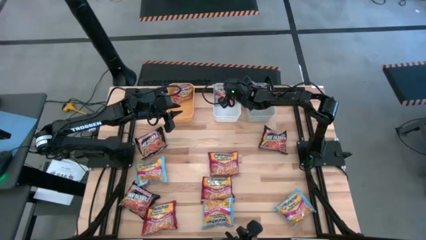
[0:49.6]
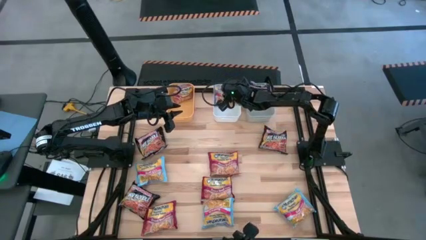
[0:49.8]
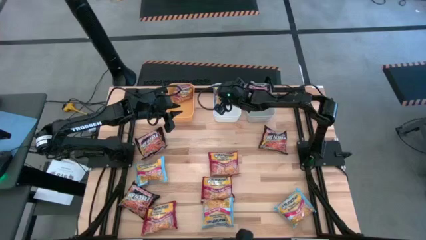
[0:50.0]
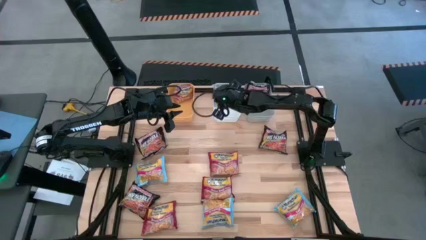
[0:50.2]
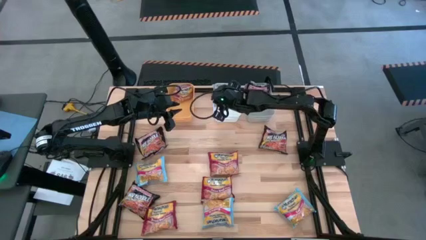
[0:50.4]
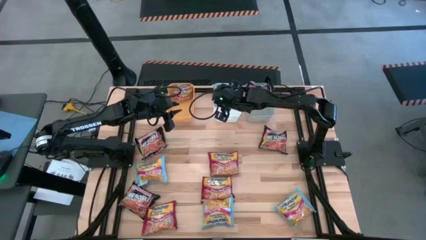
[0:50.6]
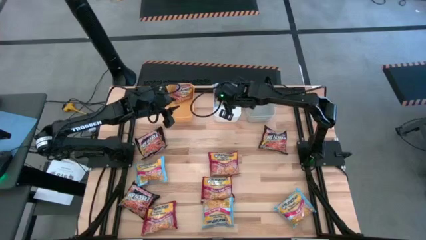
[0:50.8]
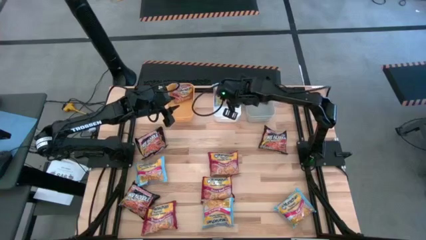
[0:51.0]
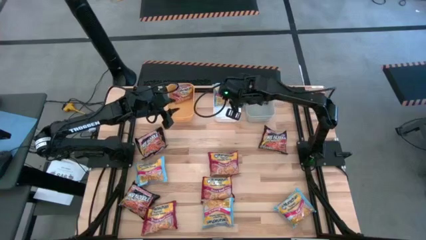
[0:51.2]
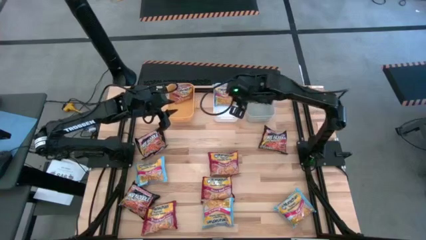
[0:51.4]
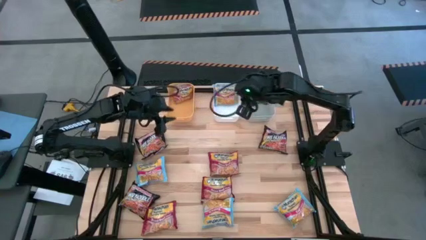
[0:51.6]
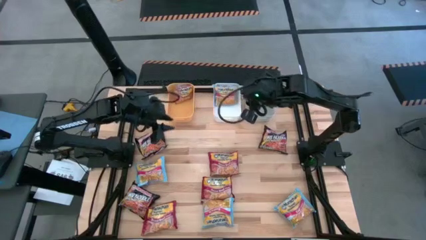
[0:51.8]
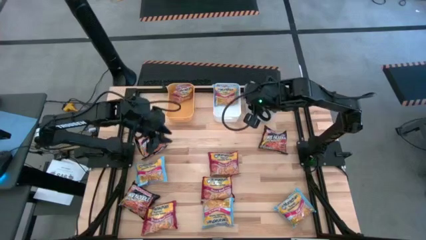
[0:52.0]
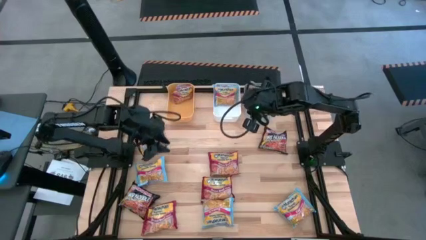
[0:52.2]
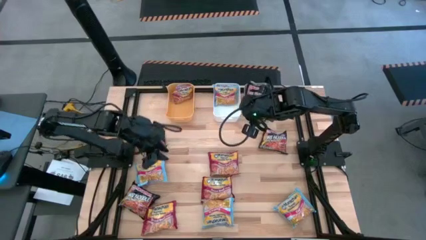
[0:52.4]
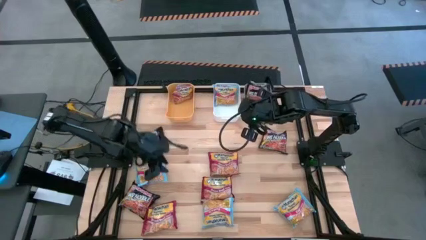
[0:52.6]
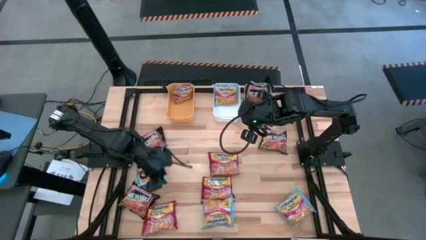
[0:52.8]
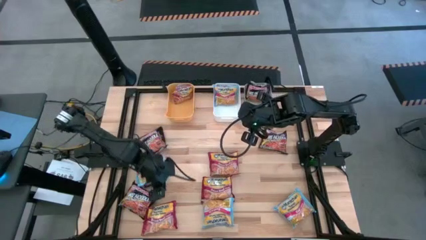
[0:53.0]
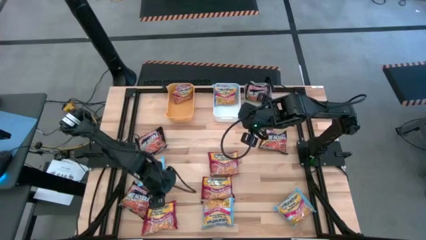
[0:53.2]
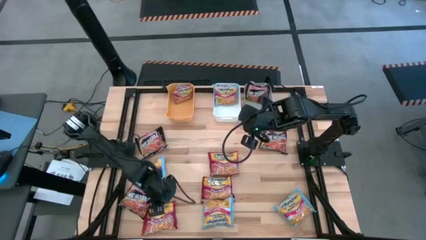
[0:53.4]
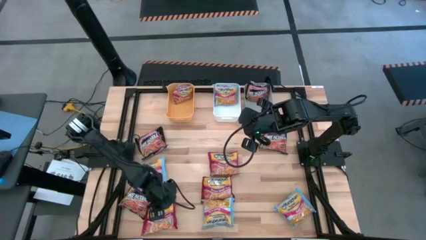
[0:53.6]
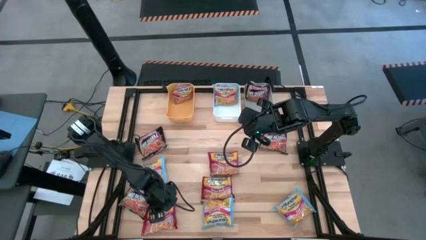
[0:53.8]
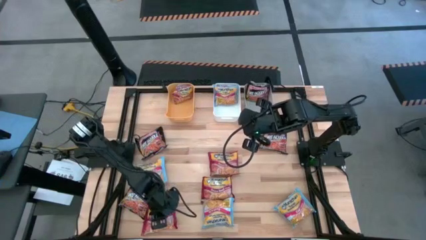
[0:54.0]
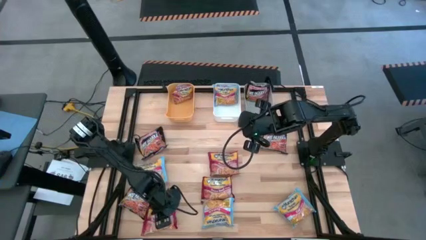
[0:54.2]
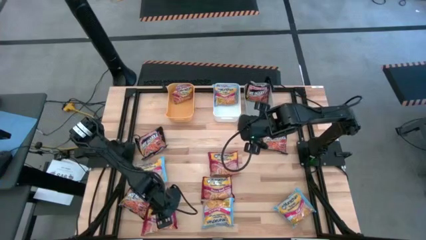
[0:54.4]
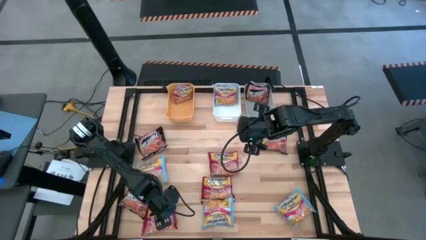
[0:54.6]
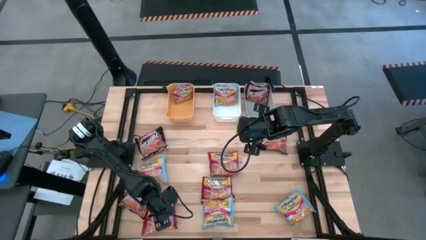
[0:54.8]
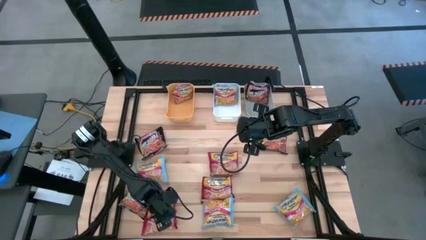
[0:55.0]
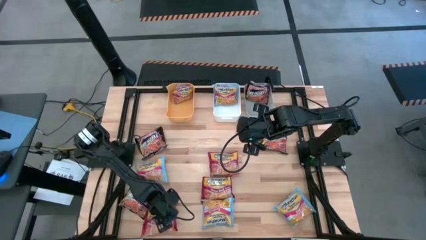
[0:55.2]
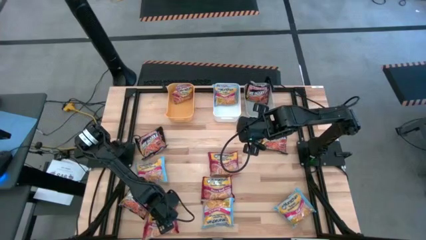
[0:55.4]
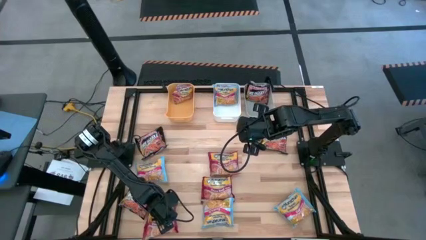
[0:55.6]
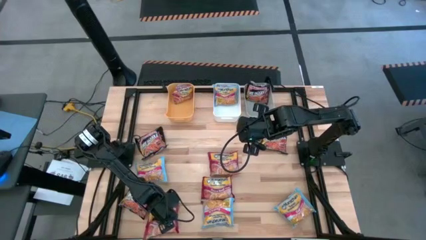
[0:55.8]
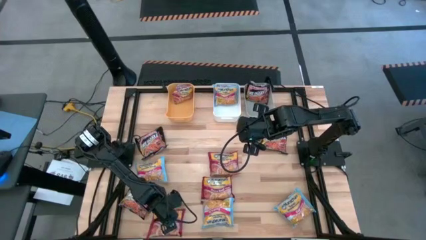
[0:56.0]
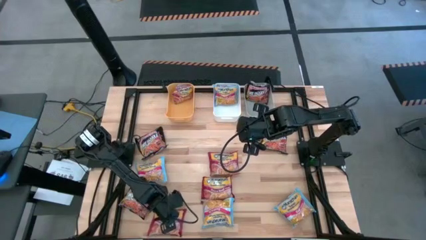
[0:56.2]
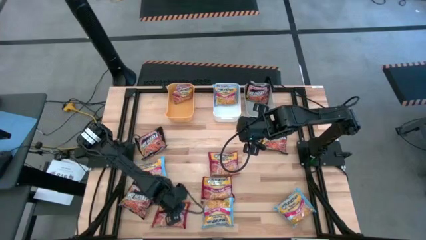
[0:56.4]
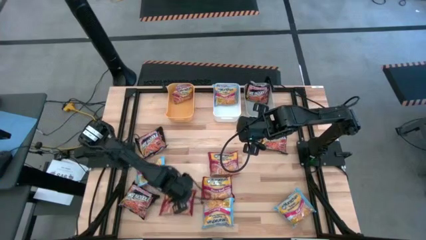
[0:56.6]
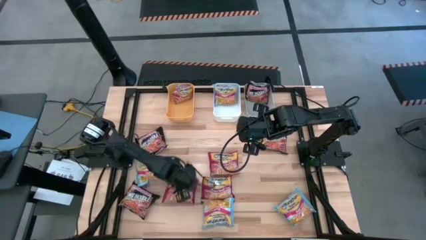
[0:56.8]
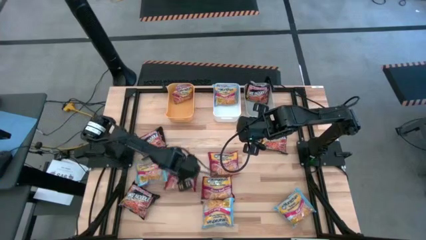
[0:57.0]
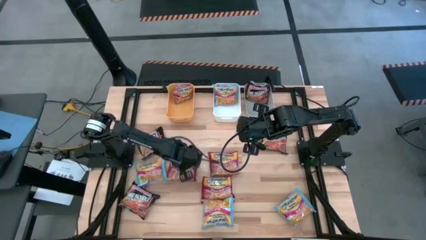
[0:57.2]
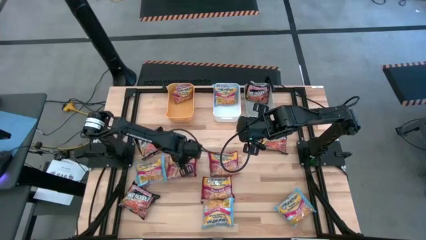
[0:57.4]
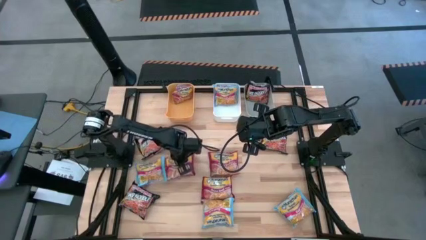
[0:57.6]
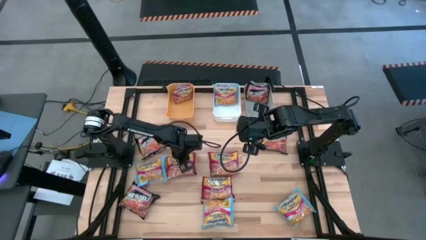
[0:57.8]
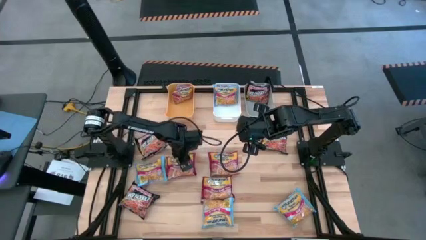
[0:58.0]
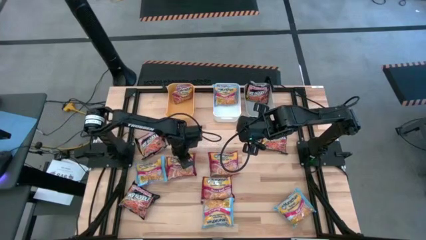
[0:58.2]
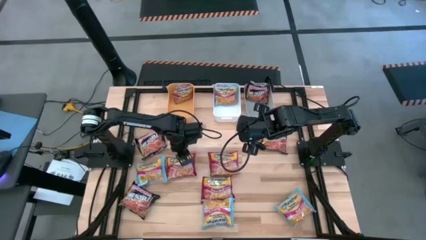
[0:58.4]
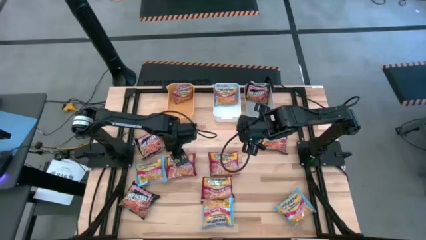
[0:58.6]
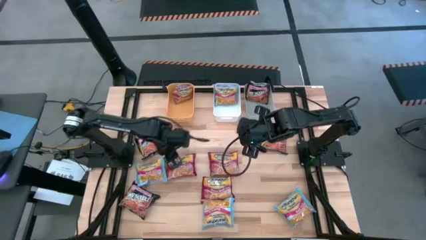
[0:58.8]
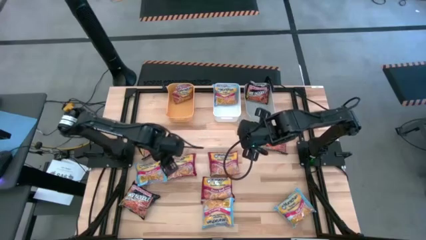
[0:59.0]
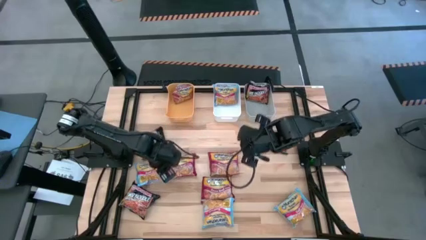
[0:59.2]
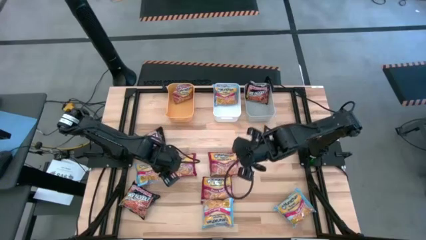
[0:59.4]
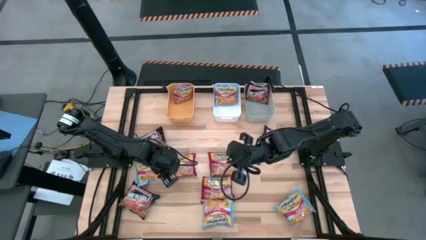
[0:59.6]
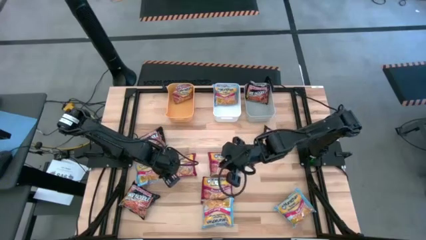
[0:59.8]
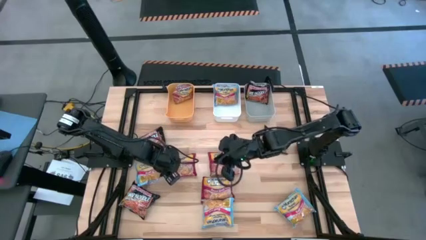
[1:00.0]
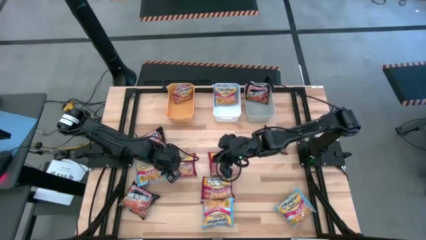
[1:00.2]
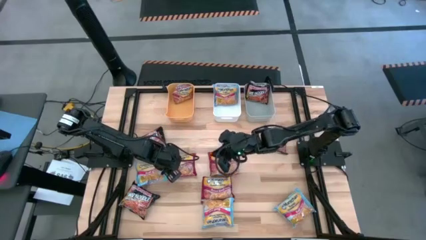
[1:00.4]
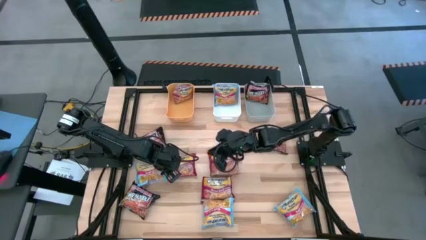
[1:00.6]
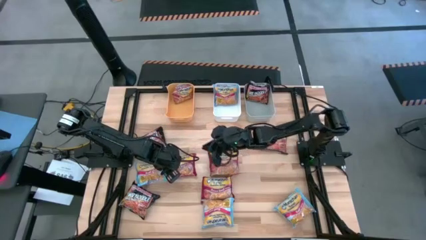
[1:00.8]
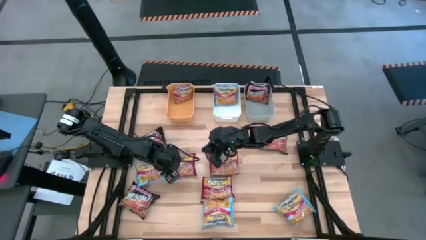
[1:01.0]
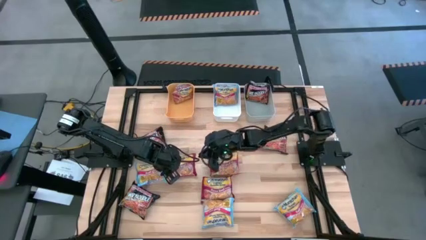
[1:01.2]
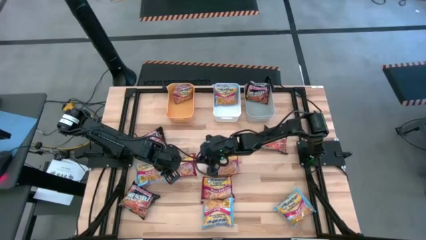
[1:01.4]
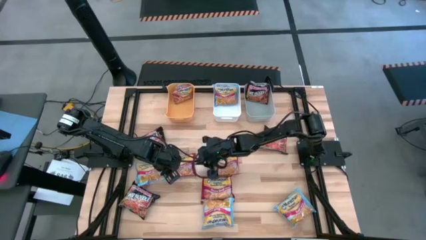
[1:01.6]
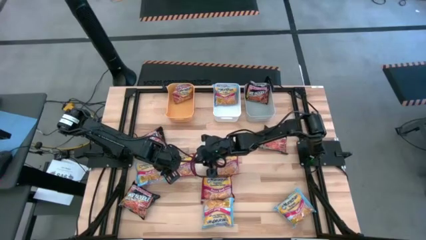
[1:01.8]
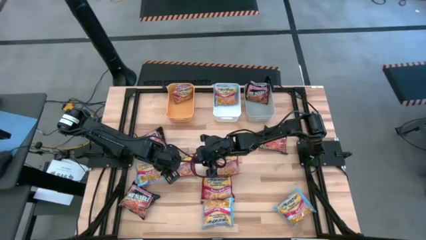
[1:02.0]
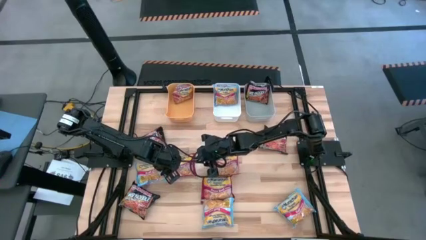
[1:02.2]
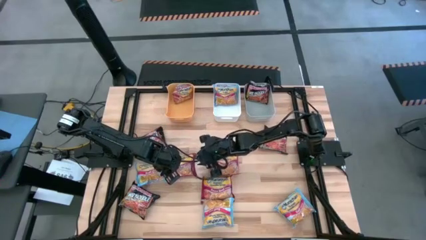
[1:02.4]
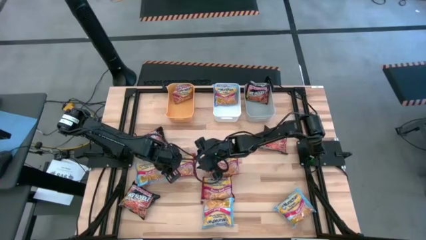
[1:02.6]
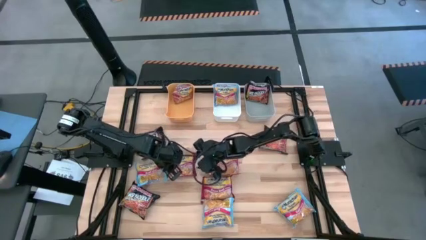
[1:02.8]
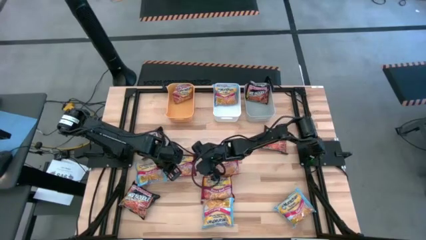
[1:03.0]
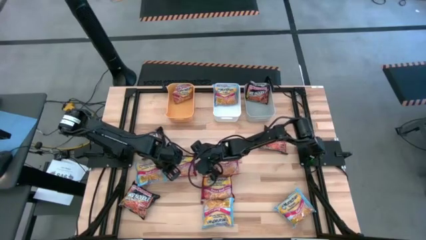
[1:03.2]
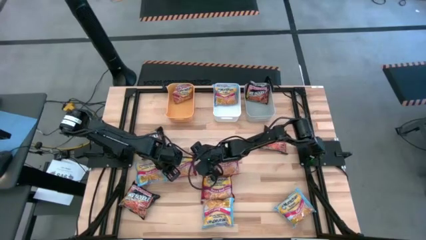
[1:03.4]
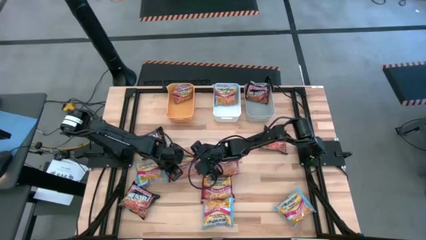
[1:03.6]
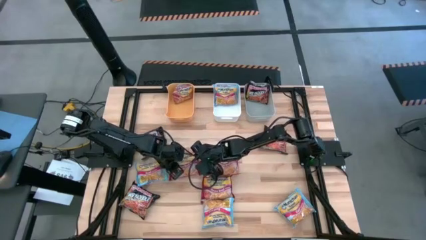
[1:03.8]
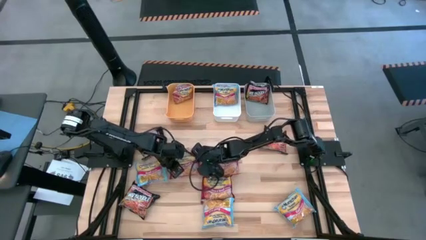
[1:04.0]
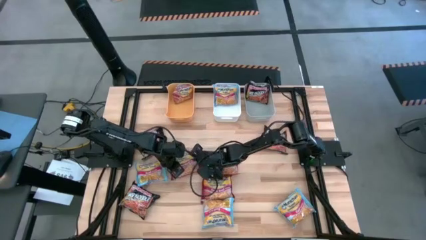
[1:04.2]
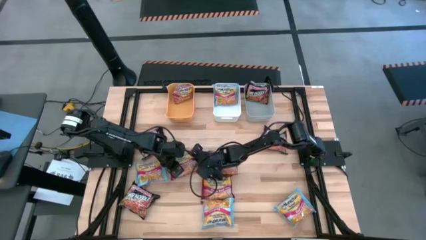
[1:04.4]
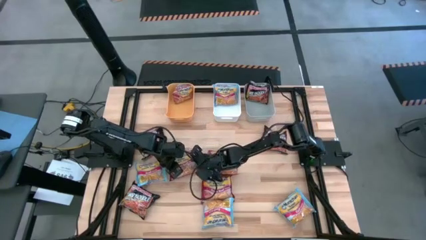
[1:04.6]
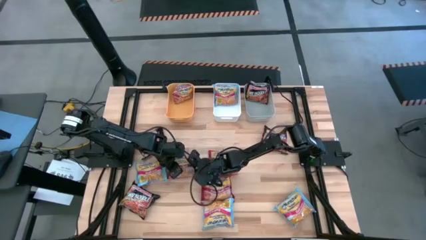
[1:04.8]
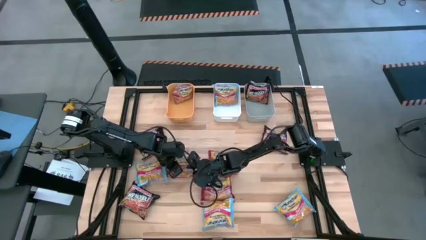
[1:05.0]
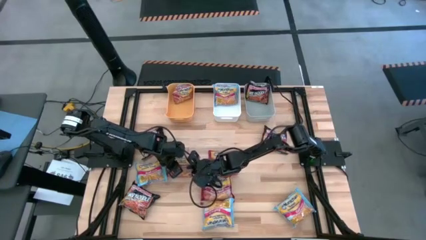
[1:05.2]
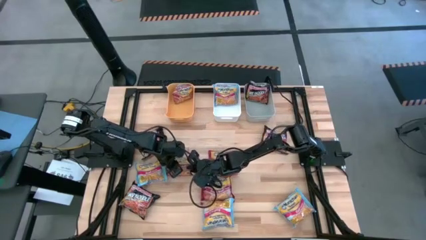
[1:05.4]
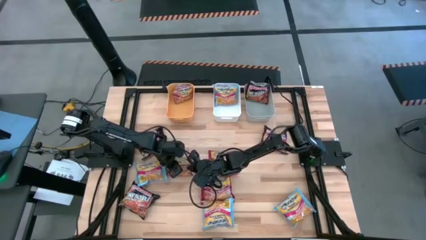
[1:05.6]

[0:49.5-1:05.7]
Task: Sort Maruchan noodles
Put the red noodle pack into the yellow bin

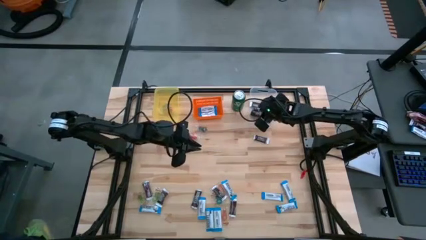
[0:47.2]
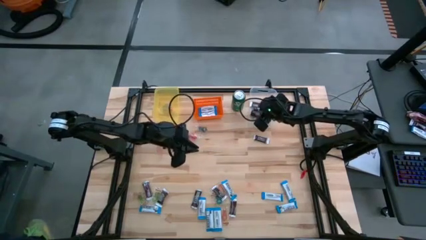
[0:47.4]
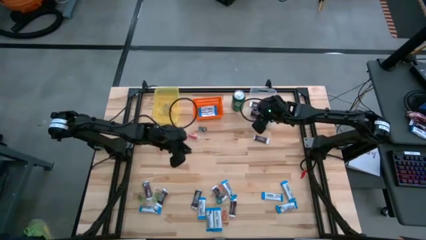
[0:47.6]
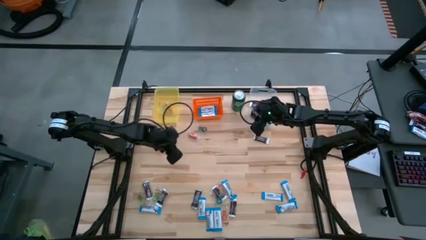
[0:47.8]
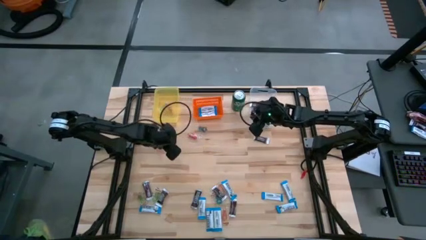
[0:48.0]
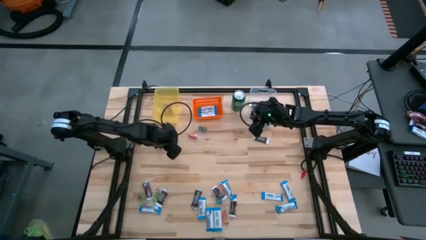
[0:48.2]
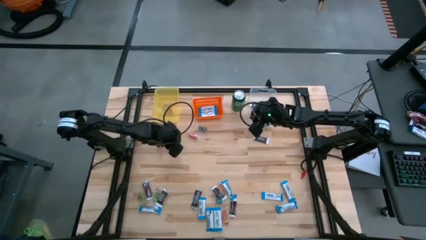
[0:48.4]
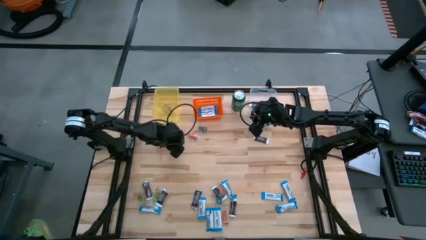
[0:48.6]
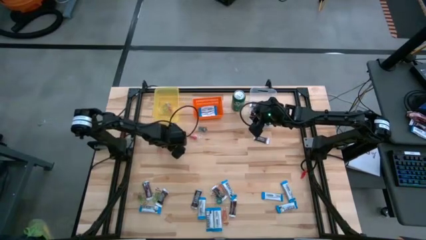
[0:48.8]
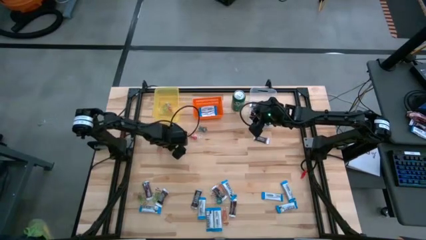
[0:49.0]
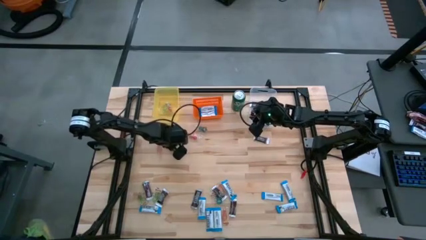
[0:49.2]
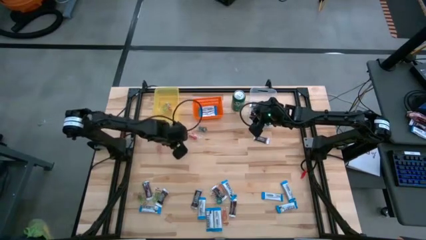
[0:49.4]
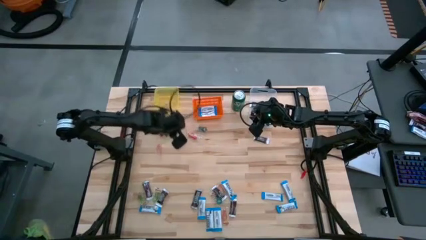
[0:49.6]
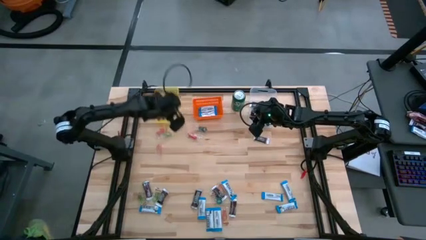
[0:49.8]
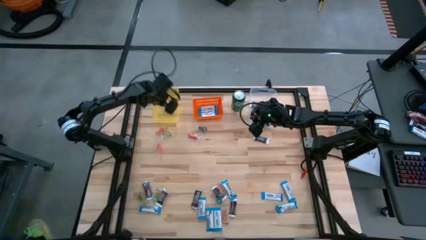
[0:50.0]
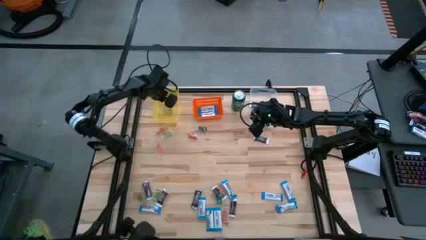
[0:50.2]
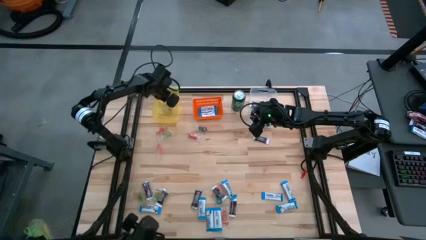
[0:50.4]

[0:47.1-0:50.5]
Task: Organize candy in baskets
Put the blue gummy into the yellow bin
